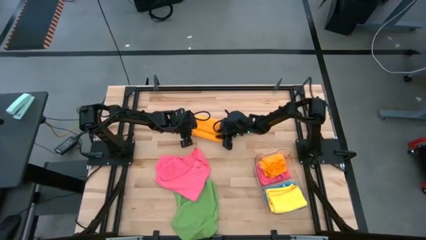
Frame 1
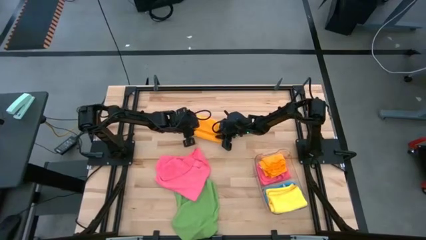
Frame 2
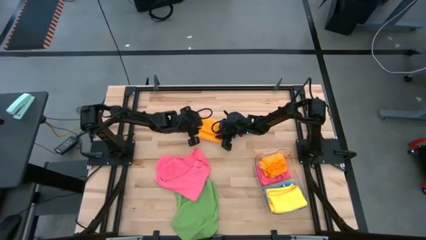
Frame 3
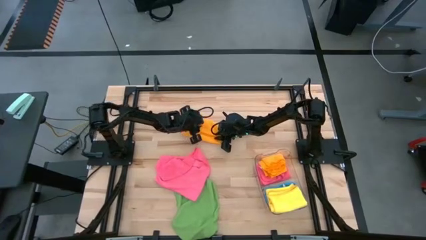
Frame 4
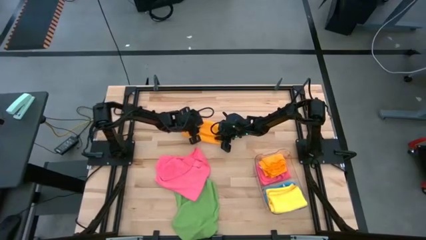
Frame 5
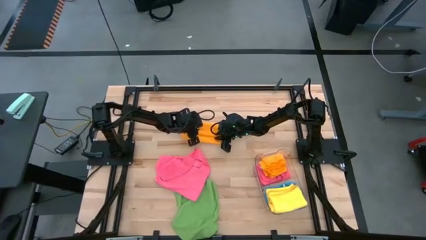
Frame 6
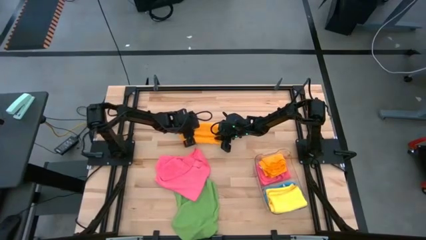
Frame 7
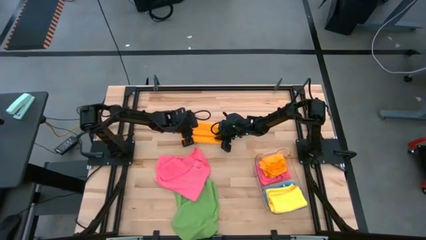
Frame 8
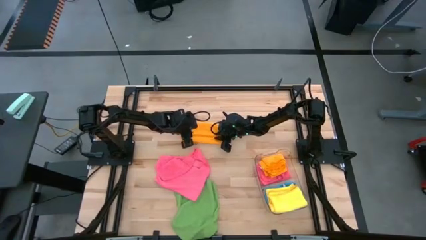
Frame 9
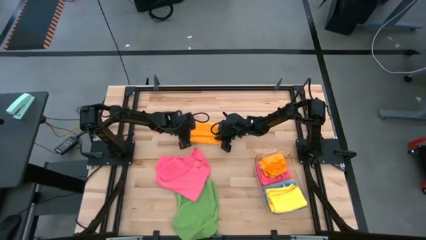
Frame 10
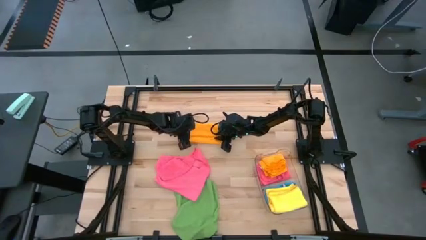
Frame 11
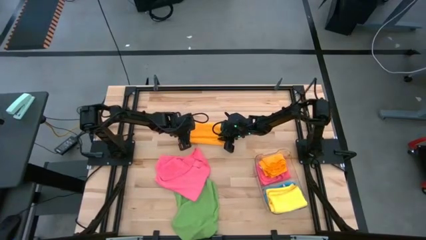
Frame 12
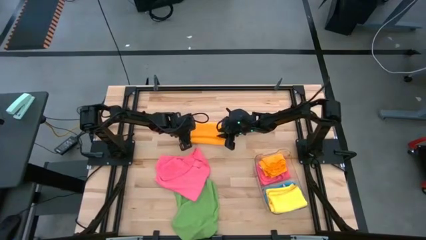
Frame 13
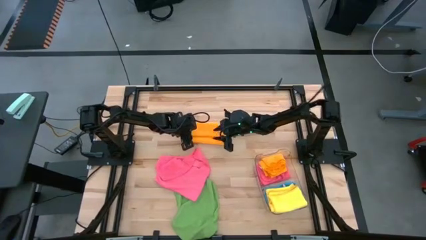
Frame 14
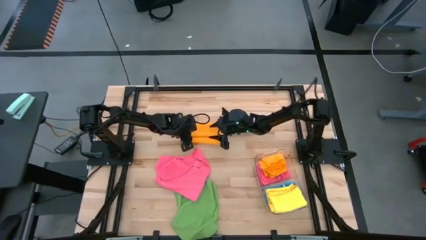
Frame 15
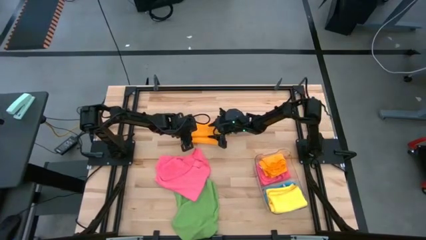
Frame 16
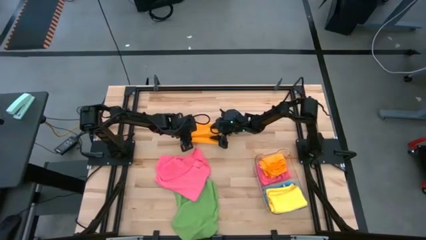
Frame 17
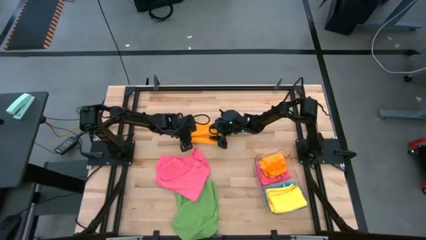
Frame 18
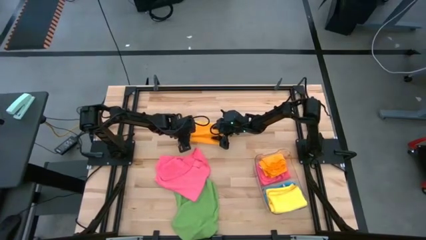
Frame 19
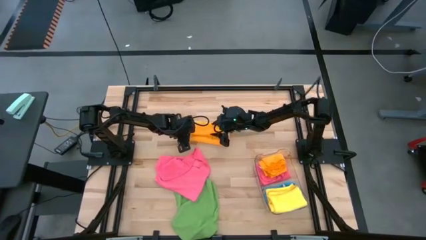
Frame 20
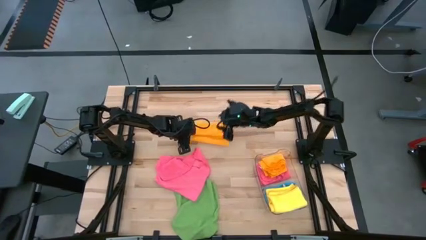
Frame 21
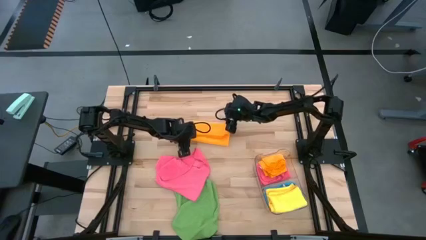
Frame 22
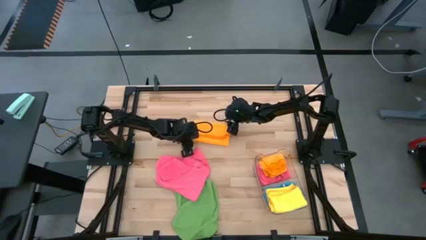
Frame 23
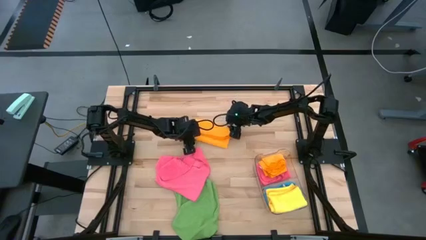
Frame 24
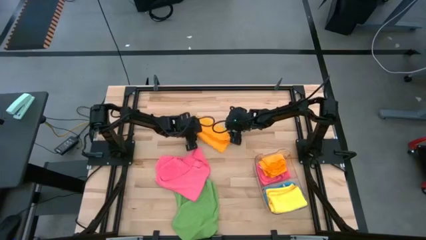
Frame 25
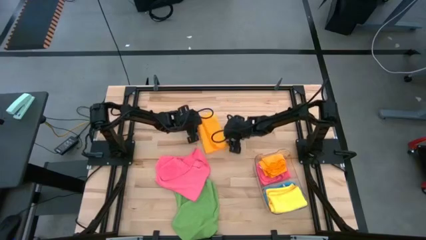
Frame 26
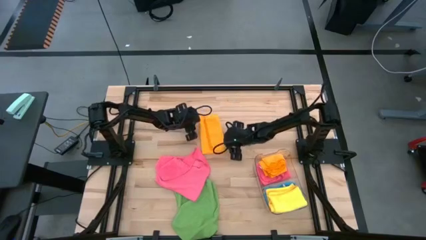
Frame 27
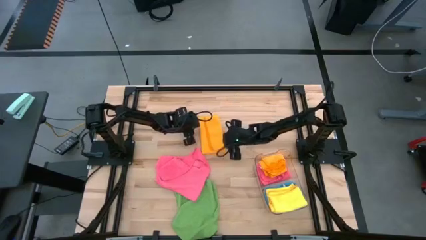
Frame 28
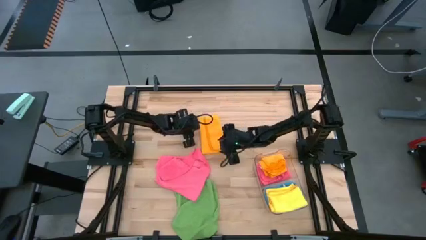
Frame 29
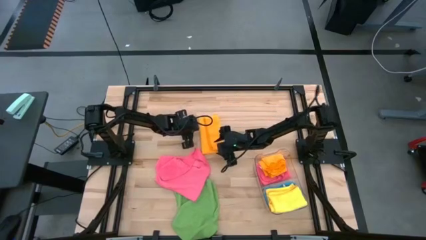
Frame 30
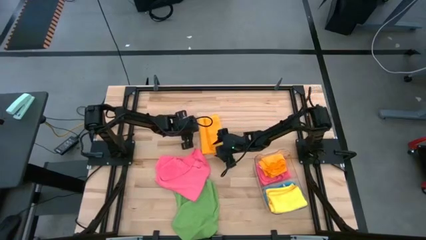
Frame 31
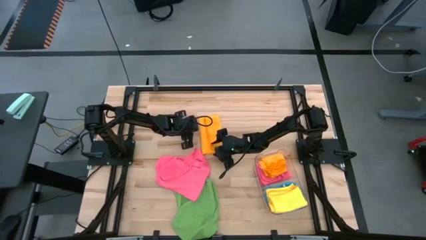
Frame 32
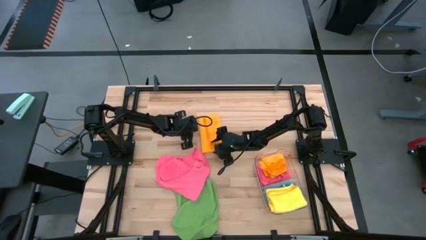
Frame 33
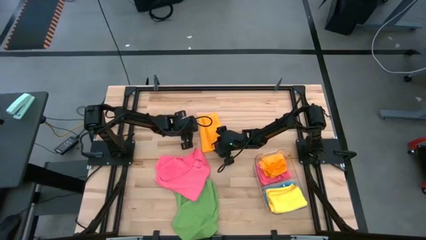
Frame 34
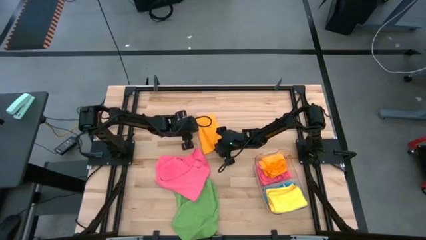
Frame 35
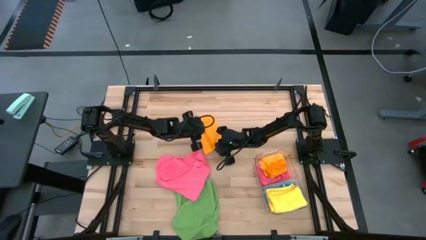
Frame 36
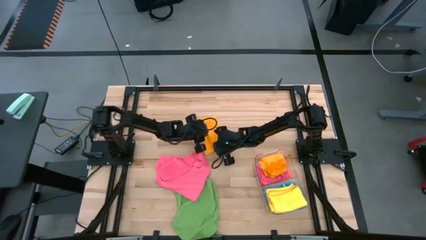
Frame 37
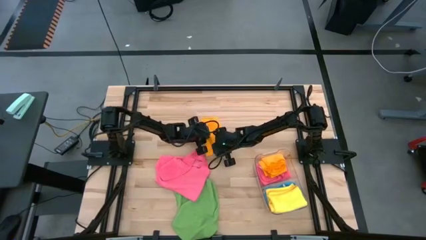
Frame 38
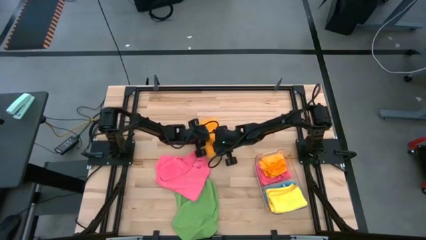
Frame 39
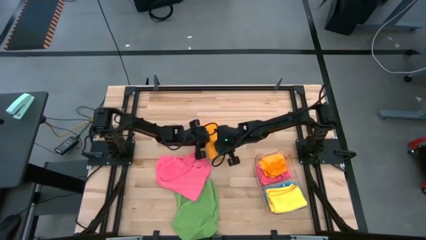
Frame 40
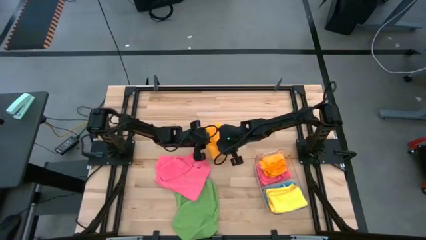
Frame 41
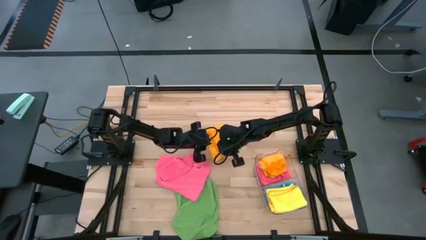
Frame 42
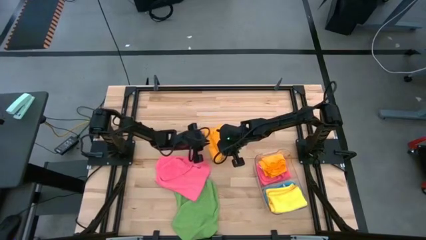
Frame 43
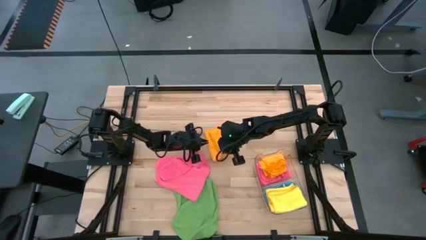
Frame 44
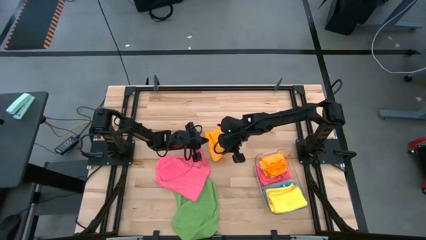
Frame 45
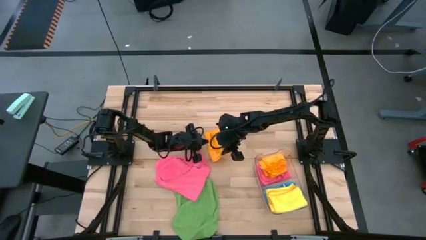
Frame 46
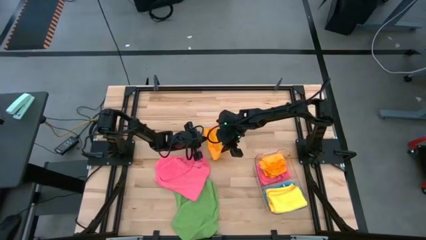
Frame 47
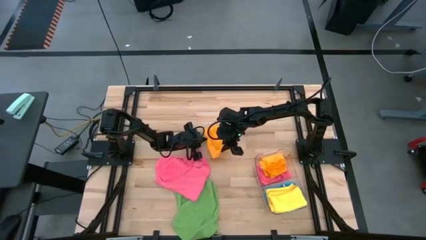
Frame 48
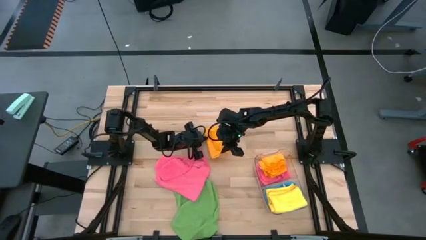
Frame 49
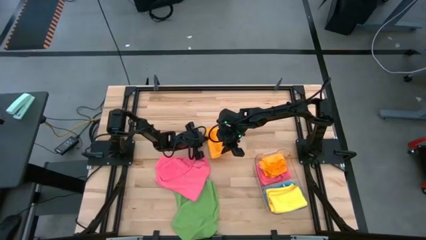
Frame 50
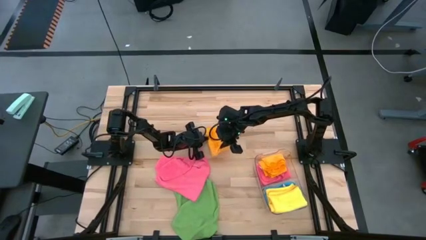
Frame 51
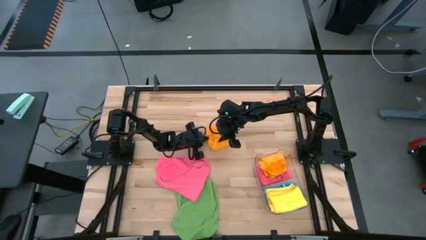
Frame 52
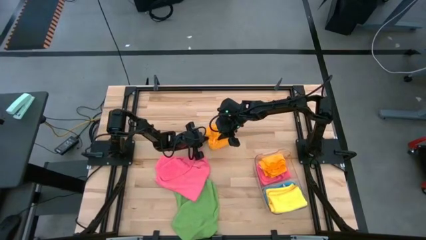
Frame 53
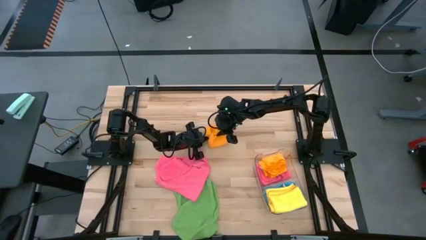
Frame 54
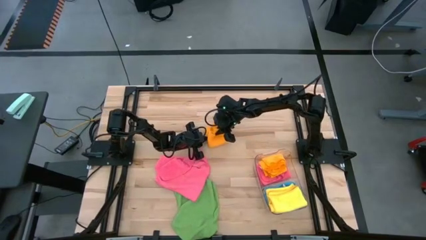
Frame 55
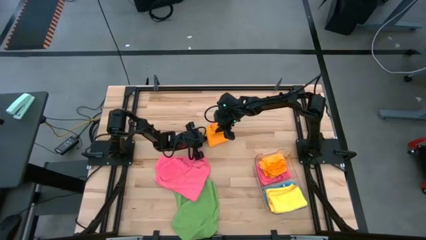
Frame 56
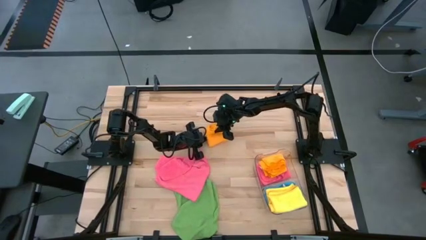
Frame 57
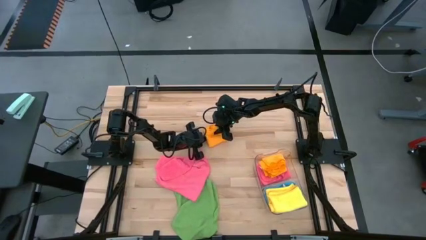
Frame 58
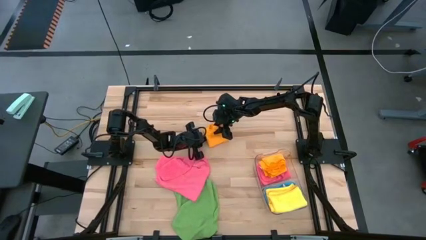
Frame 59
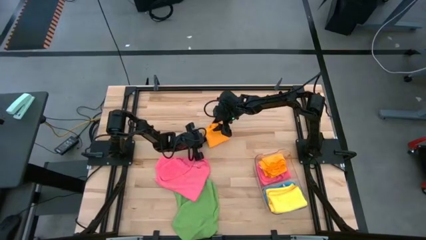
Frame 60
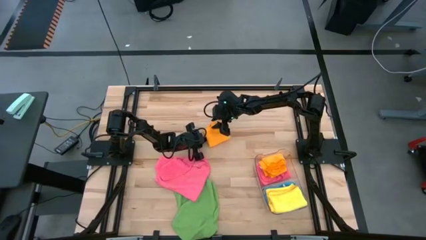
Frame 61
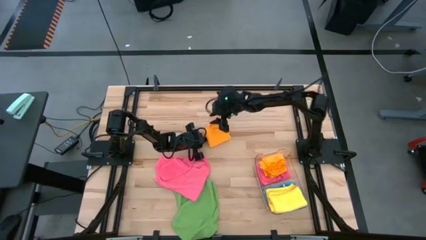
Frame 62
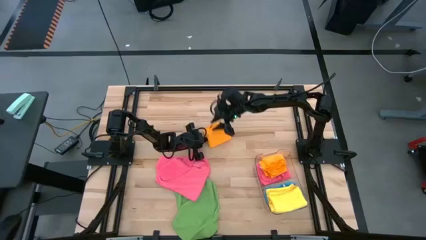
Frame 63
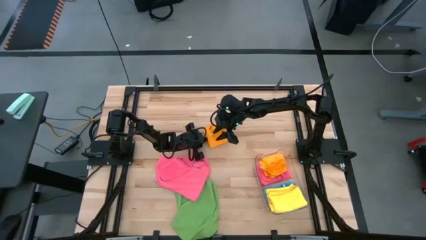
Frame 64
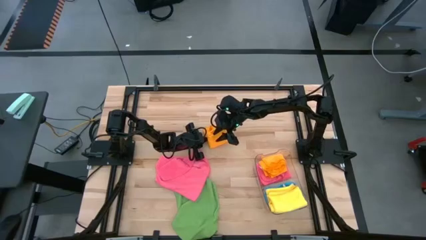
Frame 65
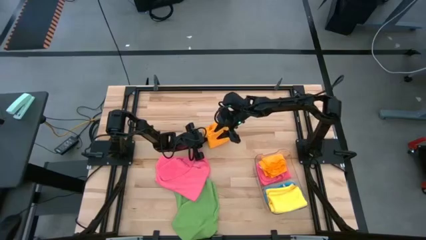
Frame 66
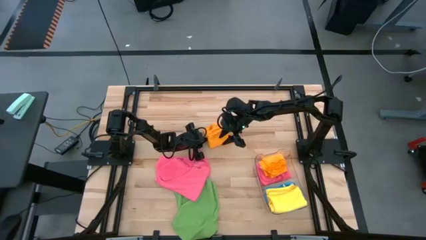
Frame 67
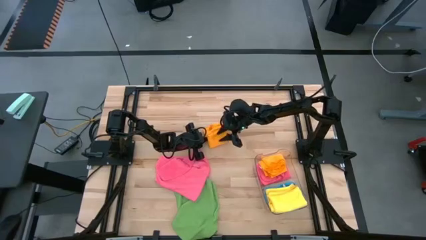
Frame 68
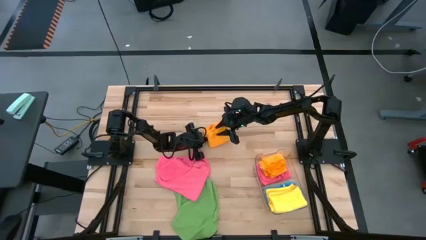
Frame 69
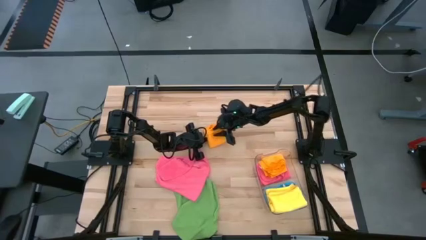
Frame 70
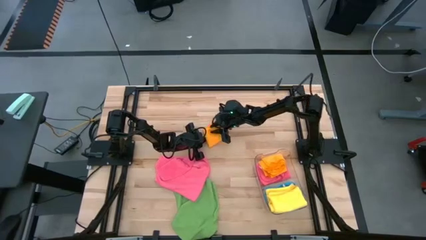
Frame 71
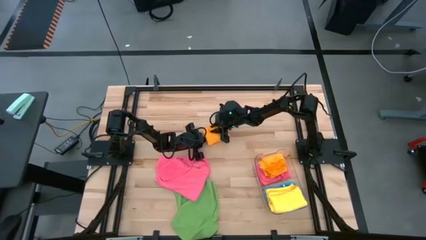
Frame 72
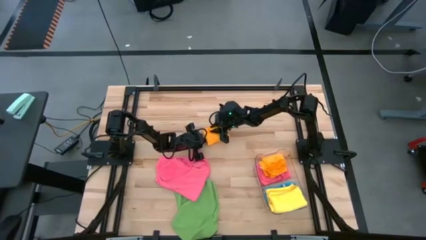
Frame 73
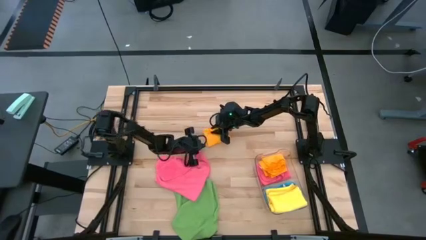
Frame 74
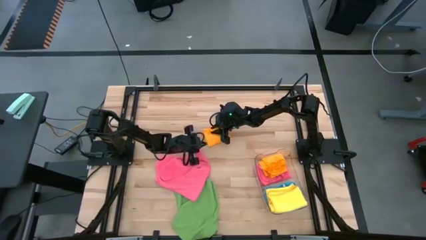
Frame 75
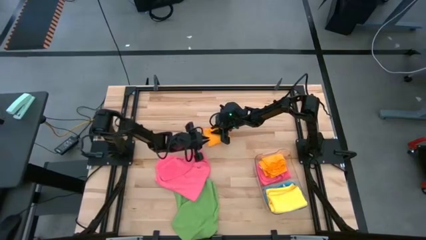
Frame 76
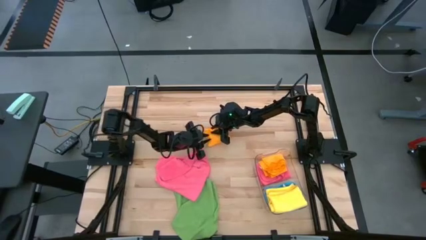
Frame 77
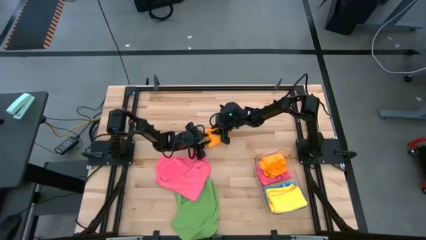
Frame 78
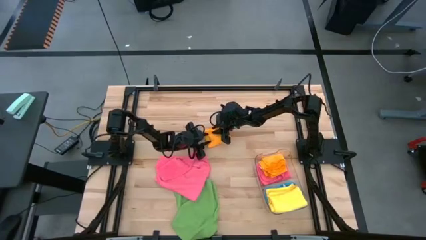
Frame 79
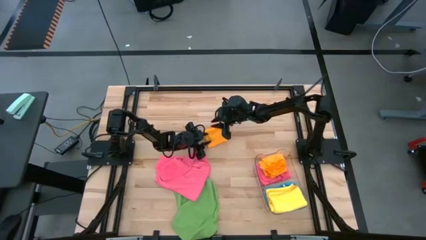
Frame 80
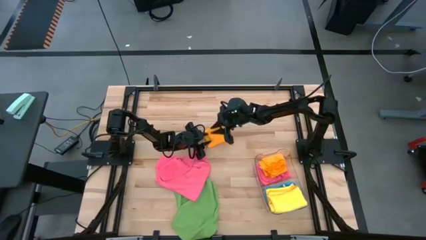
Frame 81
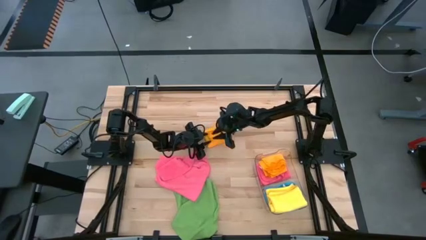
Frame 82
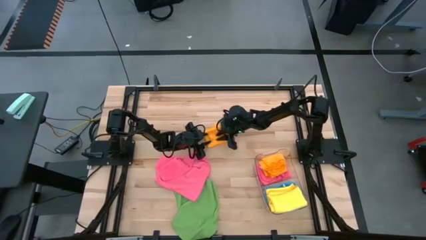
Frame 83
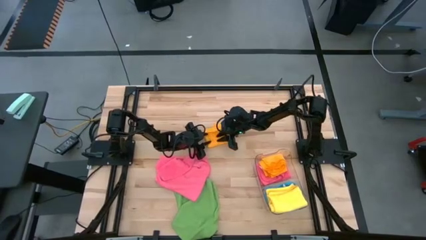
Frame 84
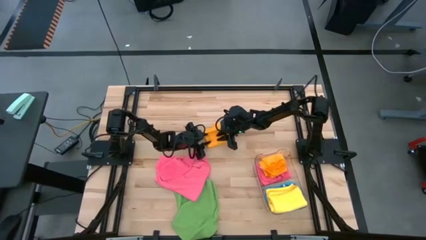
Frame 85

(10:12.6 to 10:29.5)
Task: Fold microfiber towels
Fold the orange towel
